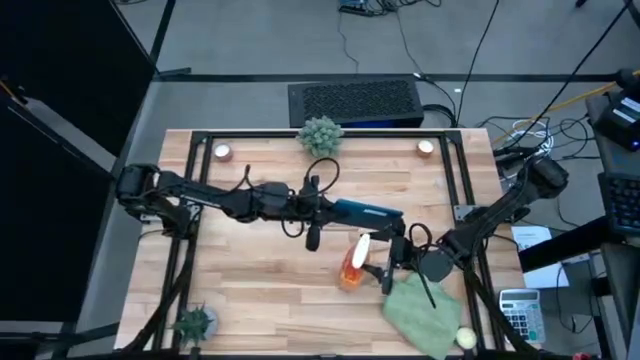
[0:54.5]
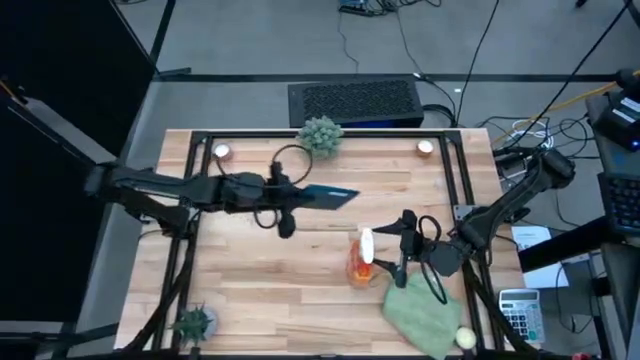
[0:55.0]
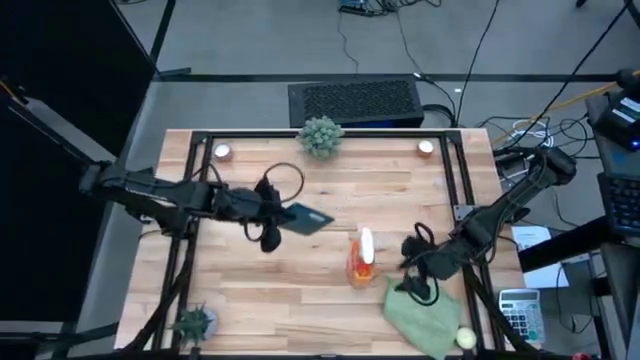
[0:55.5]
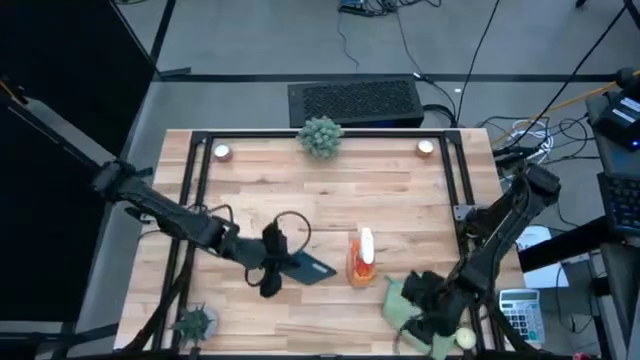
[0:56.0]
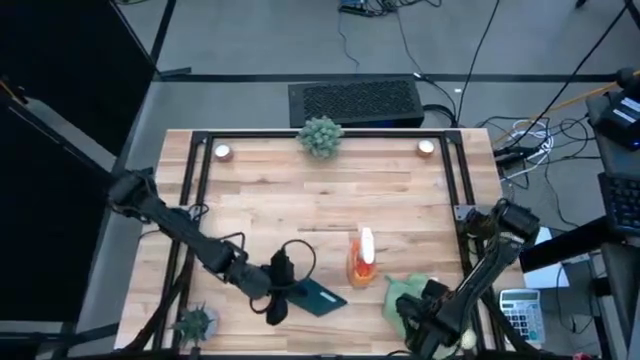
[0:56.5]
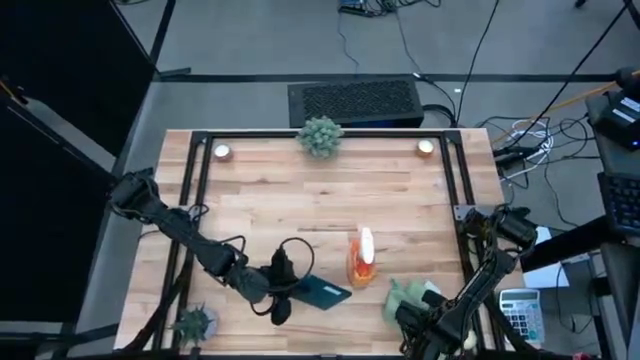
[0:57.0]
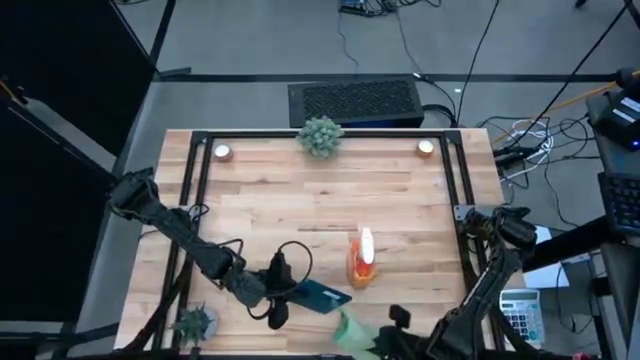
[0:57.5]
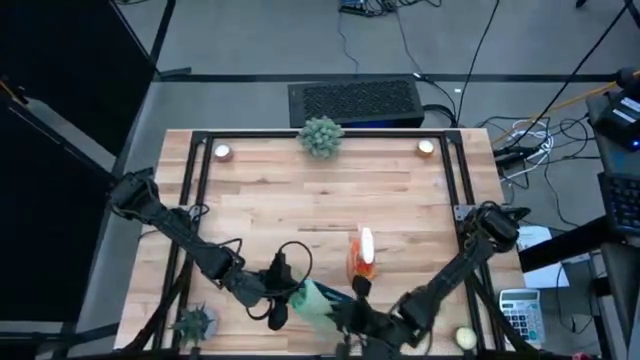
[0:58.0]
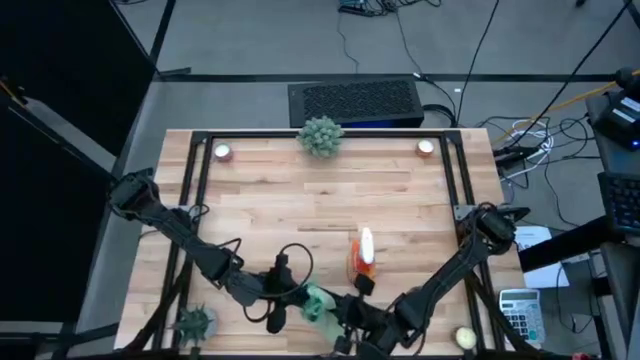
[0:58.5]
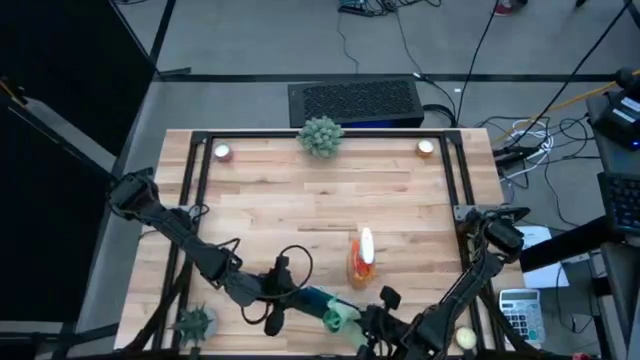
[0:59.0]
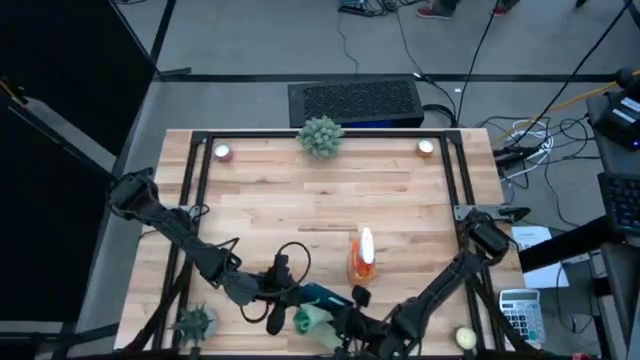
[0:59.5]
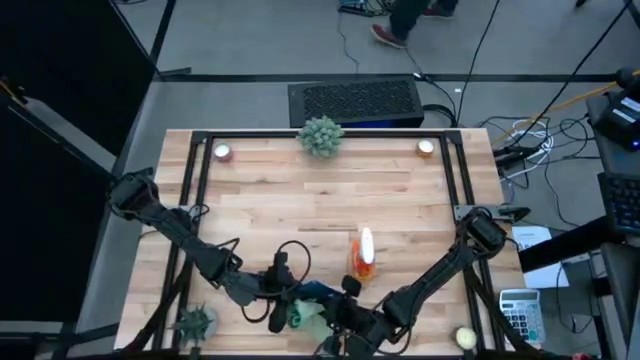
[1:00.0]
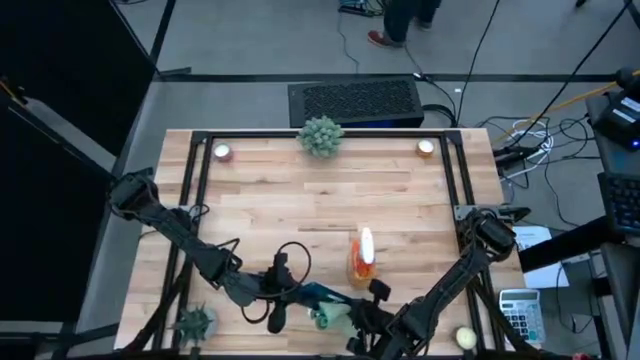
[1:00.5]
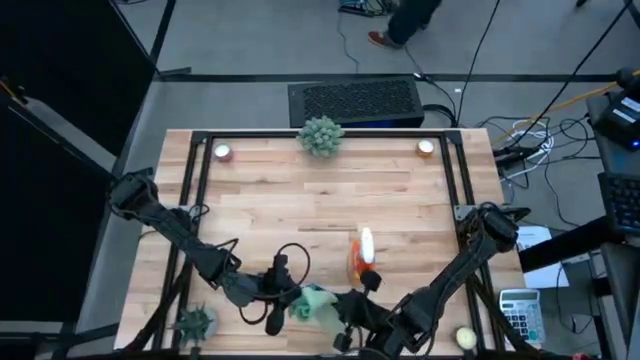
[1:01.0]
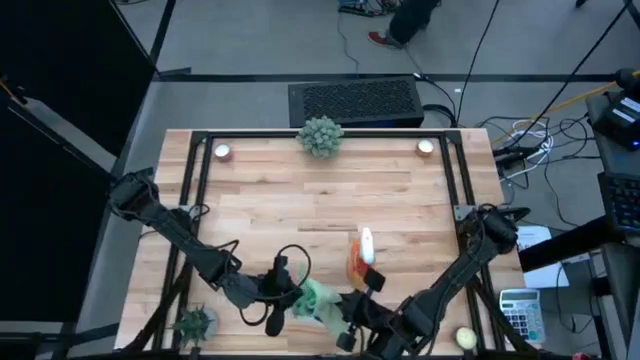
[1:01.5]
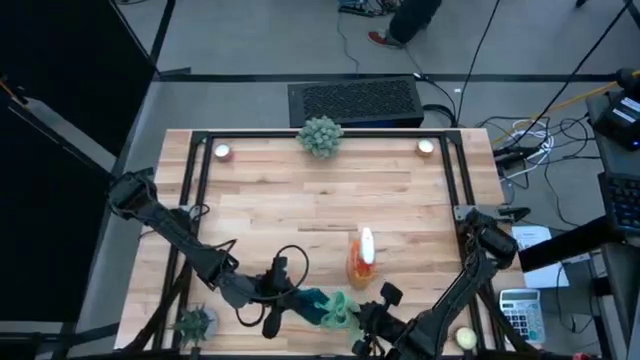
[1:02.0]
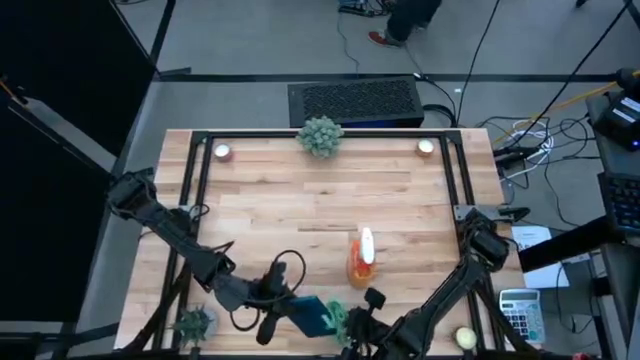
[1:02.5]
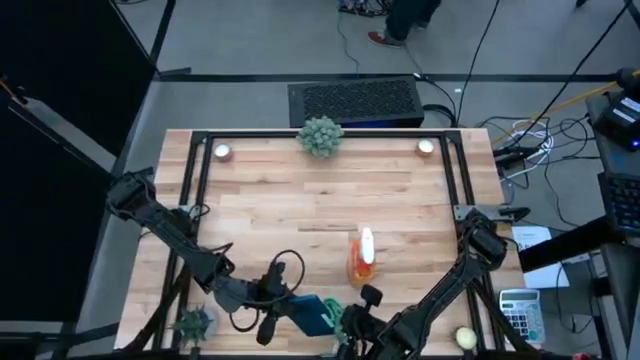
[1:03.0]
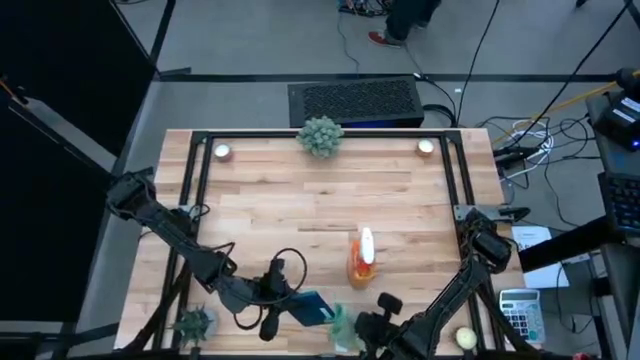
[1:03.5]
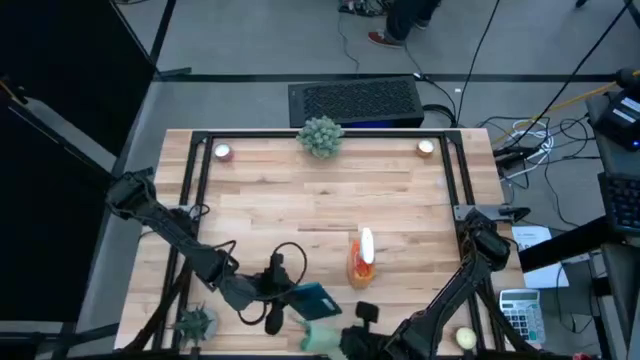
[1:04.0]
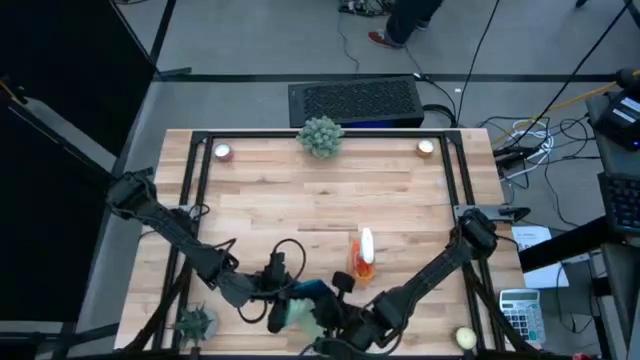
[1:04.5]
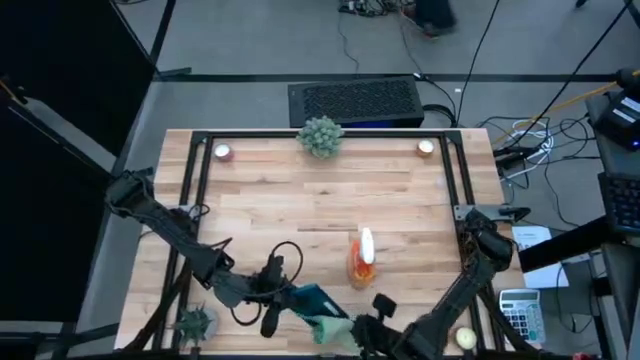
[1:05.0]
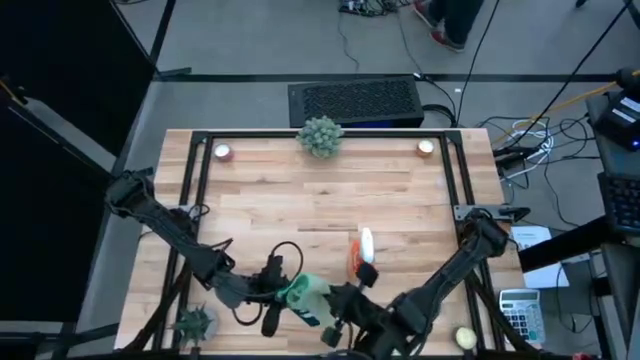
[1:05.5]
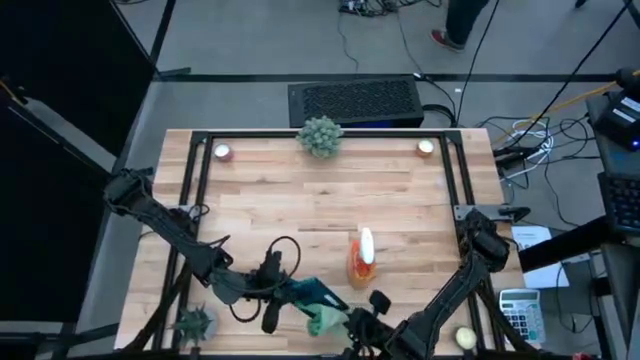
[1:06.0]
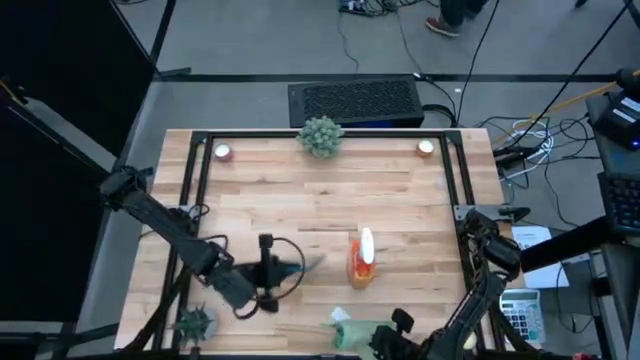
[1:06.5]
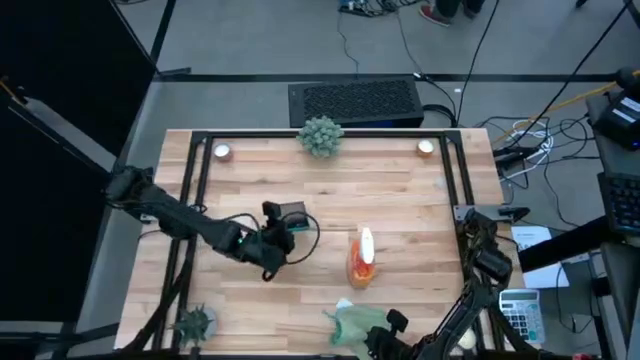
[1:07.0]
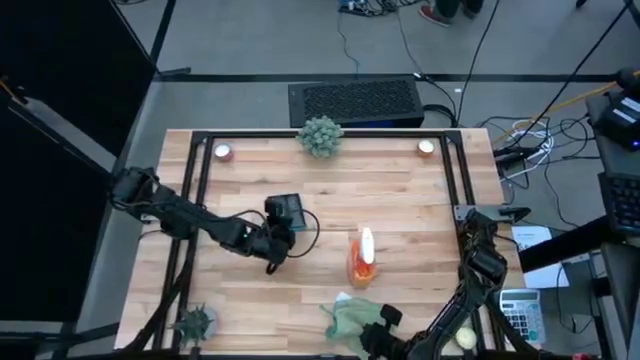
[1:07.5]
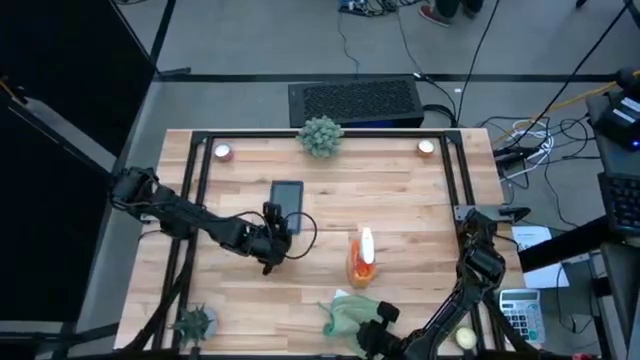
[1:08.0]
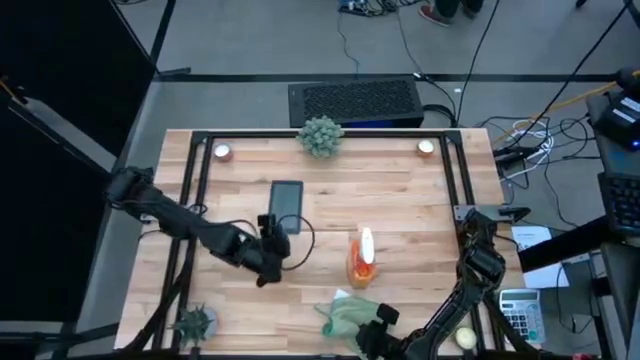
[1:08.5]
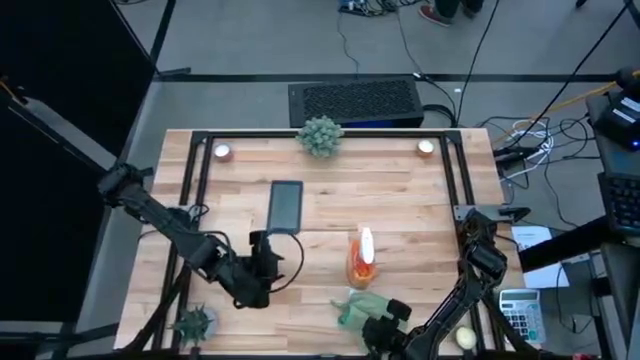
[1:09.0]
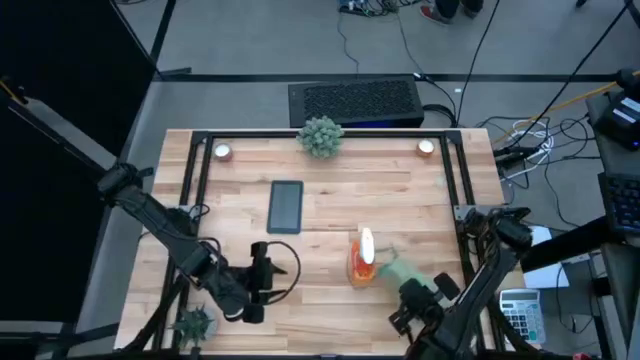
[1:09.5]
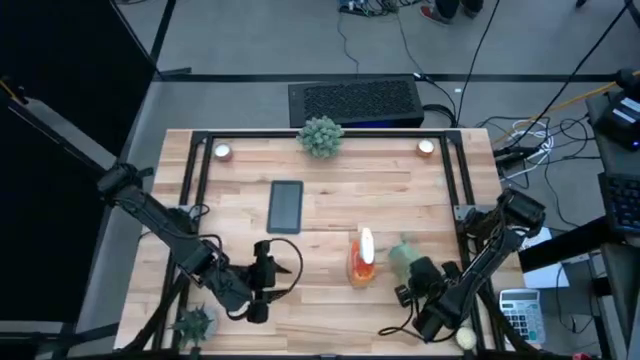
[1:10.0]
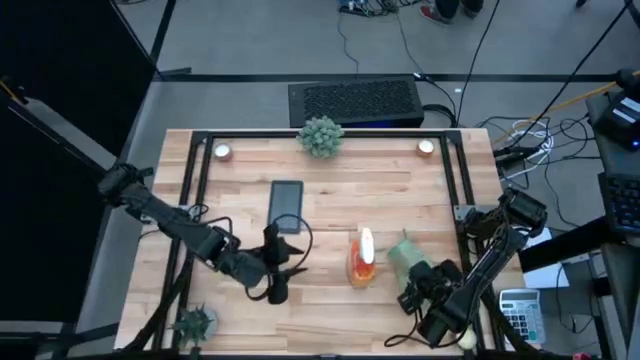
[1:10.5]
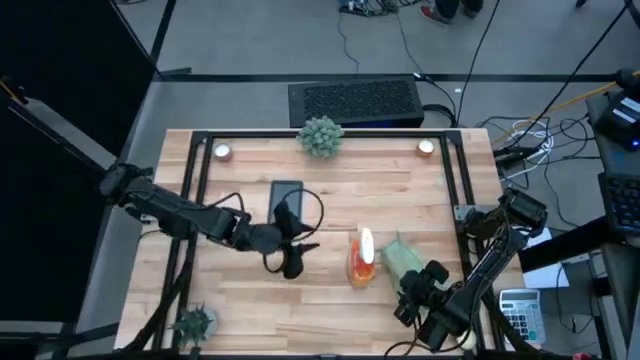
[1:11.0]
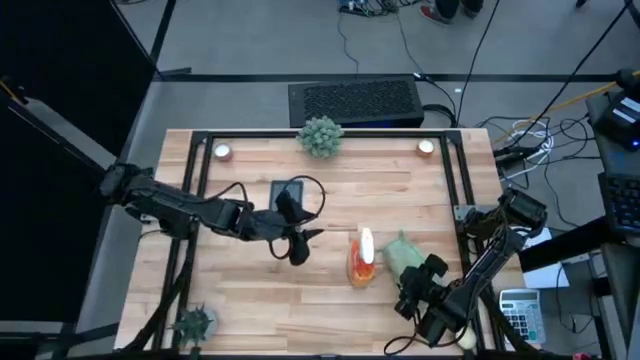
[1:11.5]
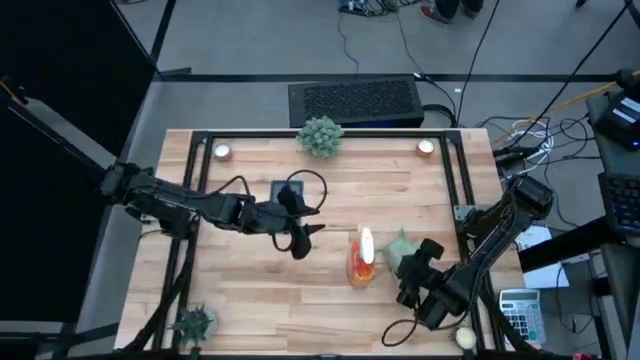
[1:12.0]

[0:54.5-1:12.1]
Task: Apply microfiber cloth
Wipe the back of the cellphone with a microfiber cloth
